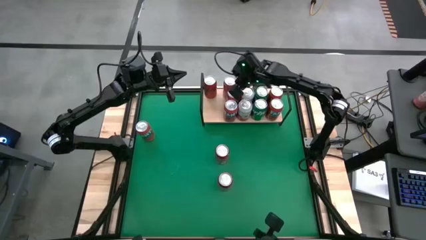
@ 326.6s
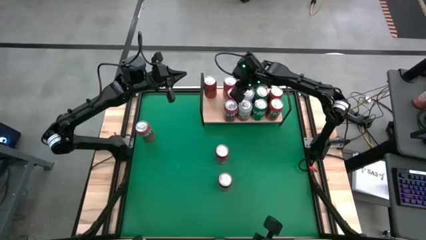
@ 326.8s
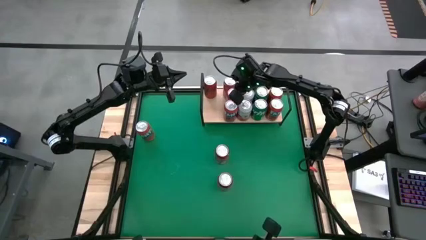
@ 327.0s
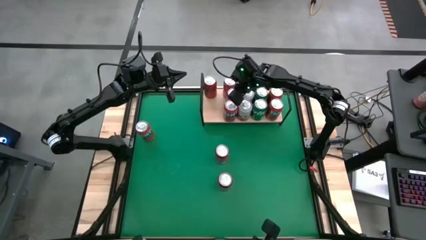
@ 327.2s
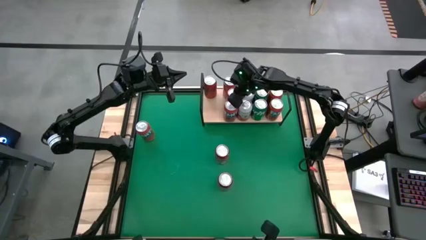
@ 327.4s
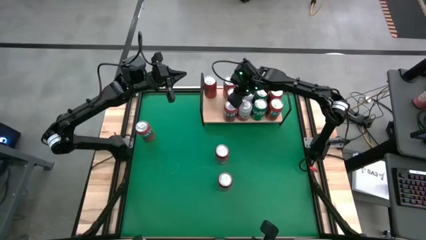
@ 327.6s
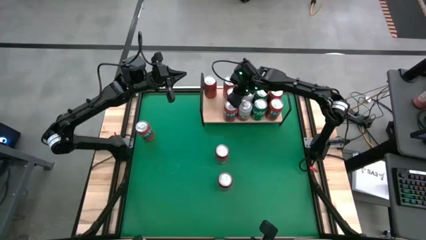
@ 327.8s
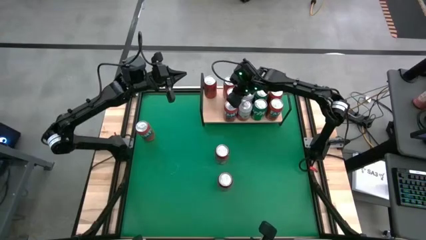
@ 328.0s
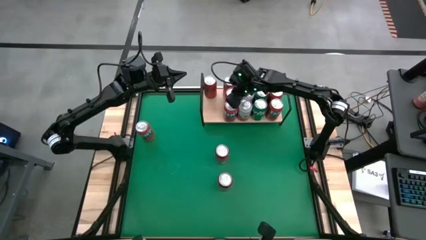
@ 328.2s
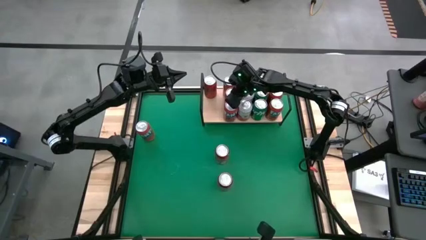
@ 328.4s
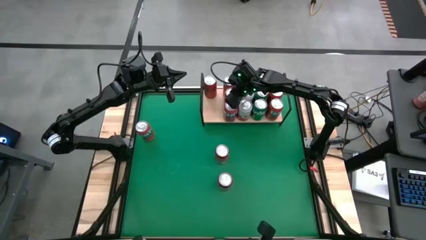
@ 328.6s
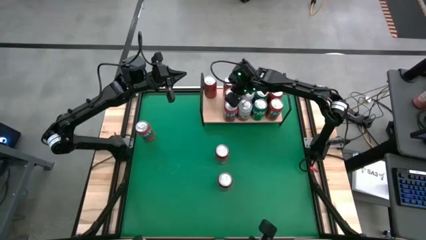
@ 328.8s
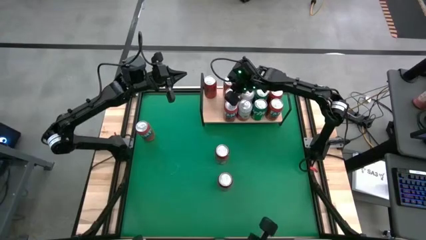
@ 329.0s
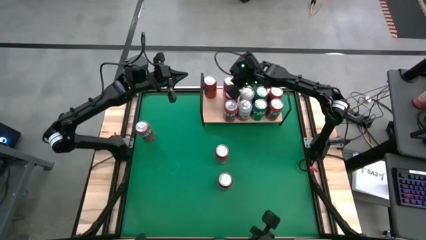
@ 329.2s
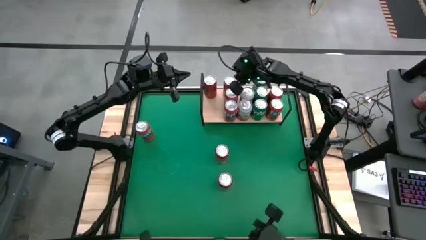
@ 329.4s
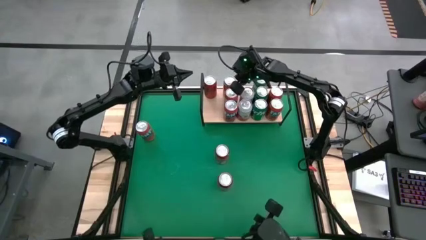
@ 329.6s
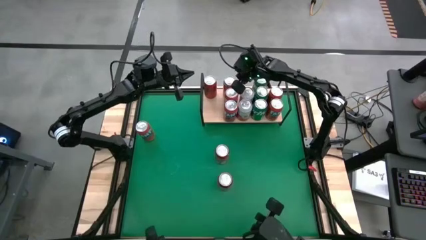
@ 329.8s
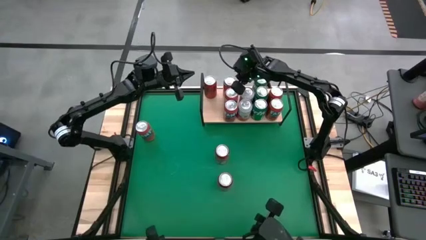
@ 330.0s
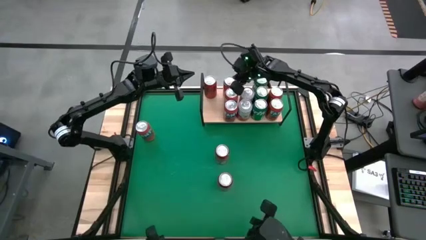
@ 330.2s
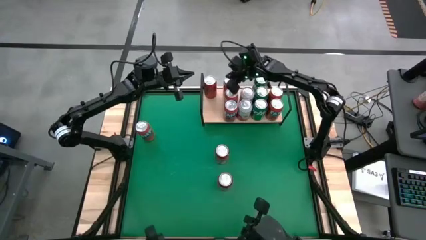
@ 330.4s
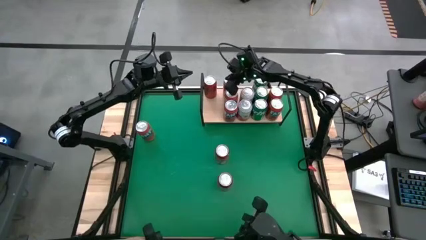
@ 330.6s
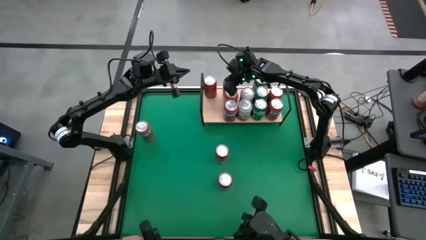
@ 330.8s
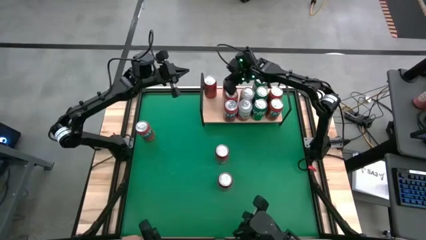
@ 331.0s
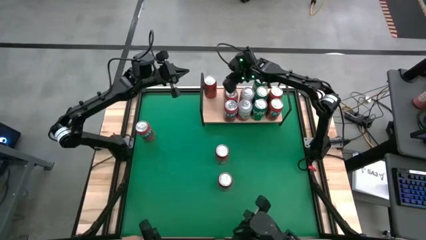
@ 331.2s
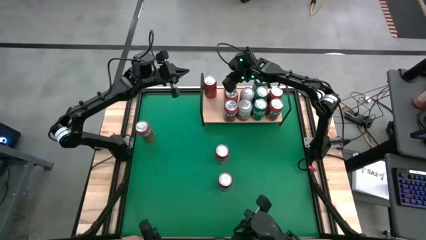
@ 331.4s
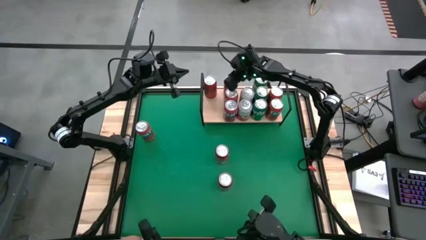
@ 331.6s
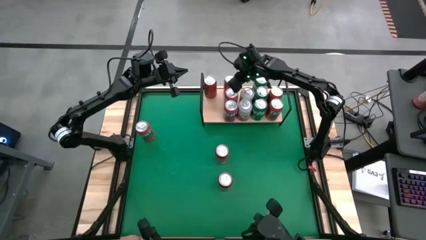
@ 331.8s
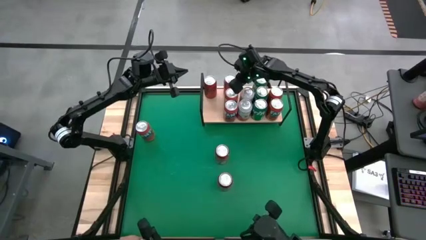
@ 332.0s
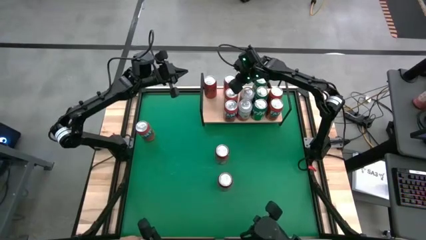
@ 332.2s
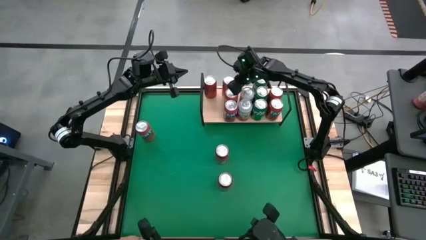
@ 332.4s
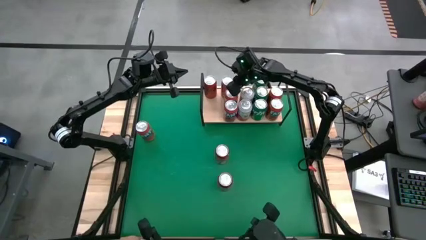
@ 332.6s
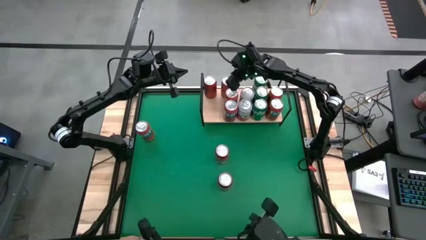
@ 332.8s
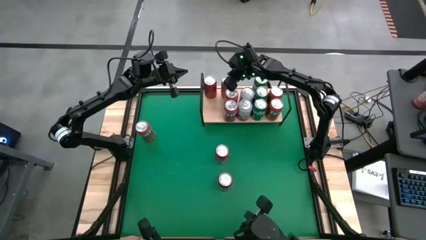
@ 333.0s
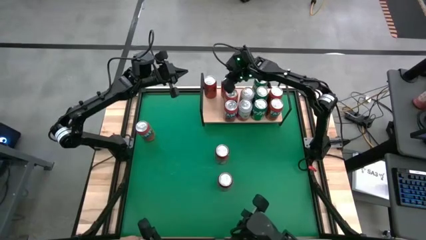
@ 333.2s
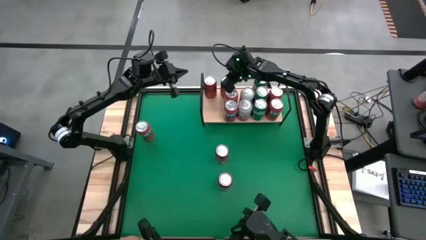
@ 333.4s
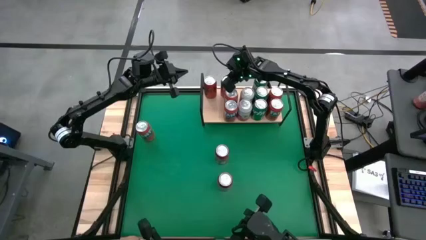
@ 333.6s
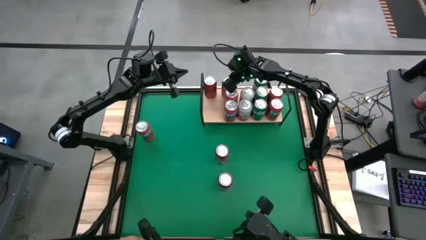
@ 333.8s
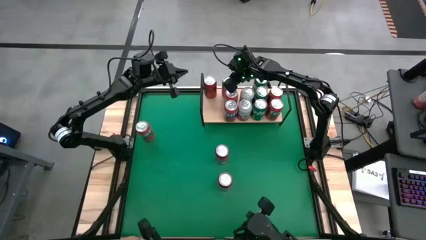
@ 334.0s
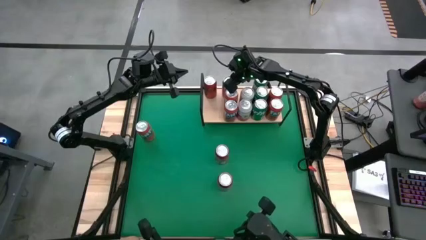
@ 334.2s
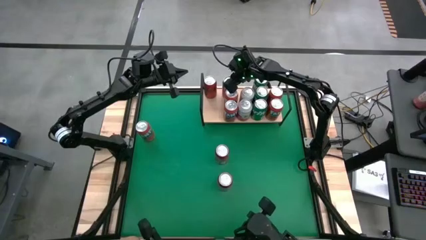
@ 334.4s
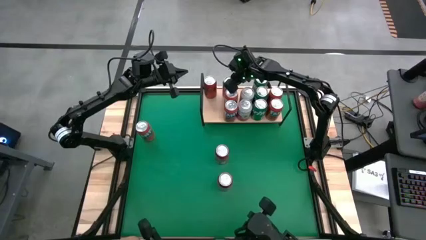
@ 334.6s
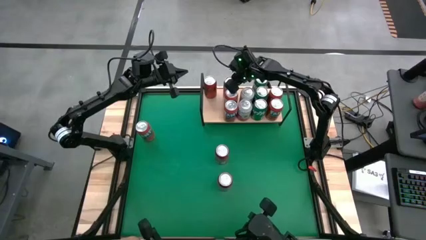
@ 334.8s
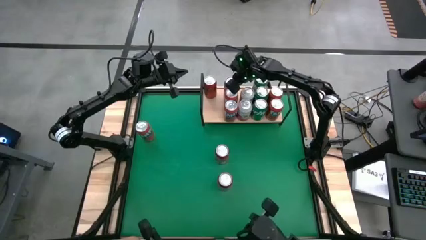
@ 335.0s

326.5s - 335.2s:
Task: Place canned beverage on shelf
Adjust the red soda cans on the shelf

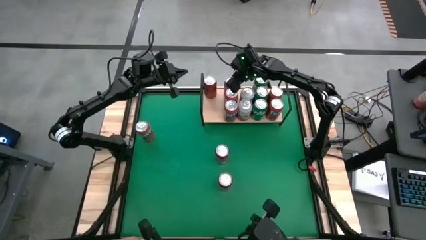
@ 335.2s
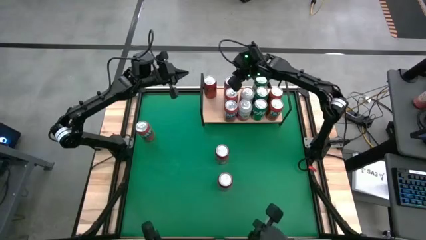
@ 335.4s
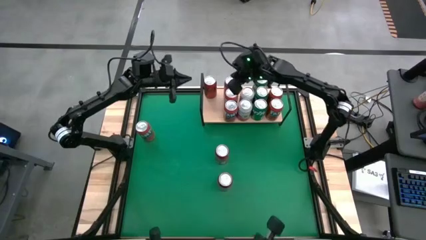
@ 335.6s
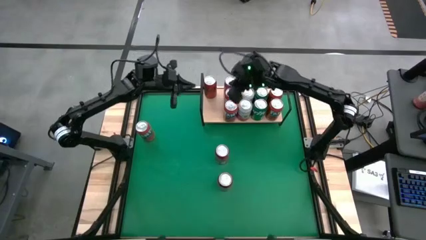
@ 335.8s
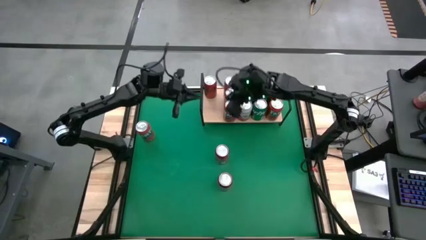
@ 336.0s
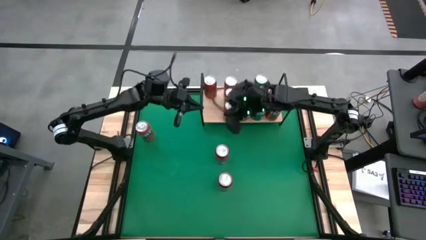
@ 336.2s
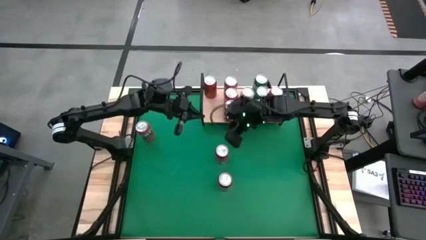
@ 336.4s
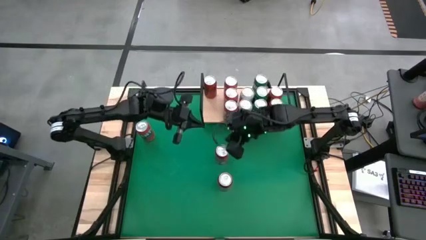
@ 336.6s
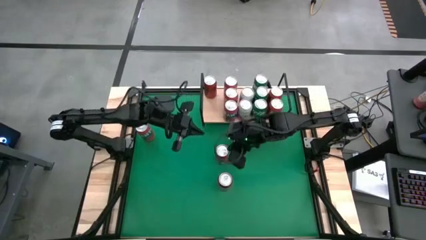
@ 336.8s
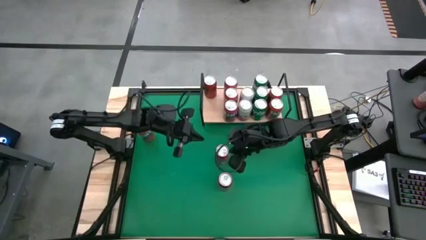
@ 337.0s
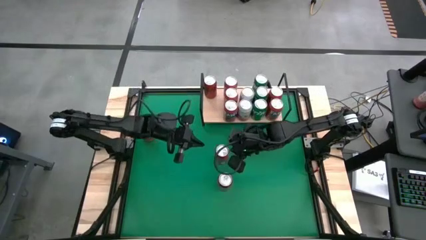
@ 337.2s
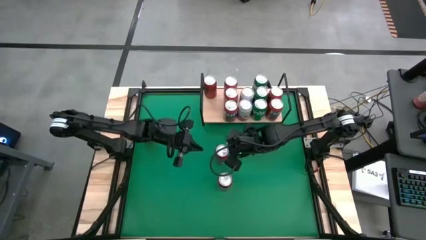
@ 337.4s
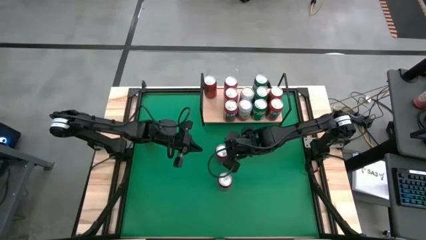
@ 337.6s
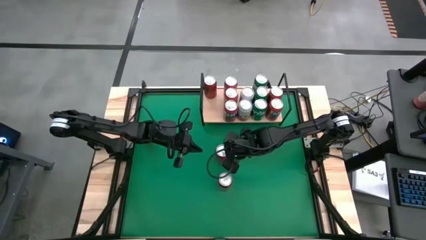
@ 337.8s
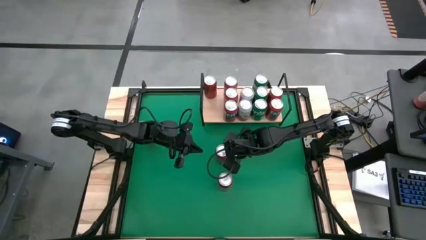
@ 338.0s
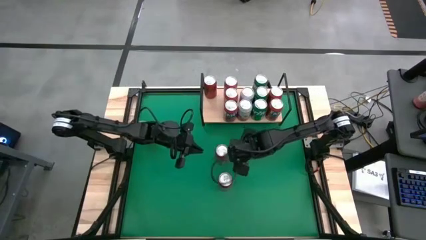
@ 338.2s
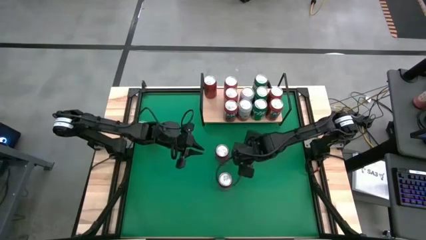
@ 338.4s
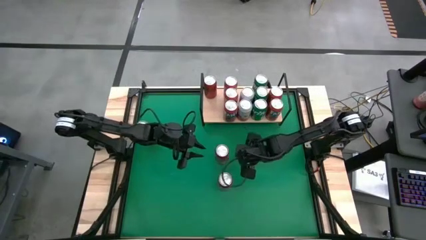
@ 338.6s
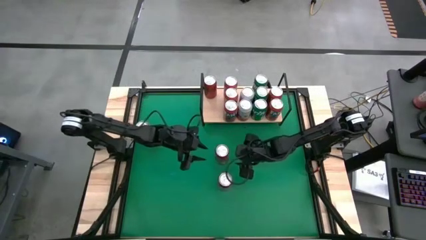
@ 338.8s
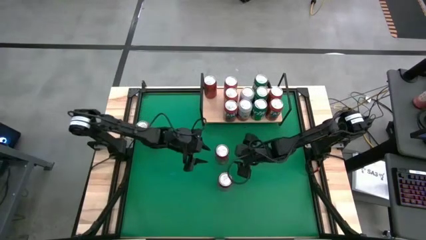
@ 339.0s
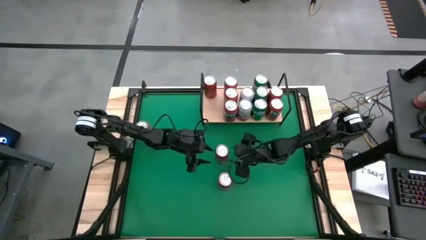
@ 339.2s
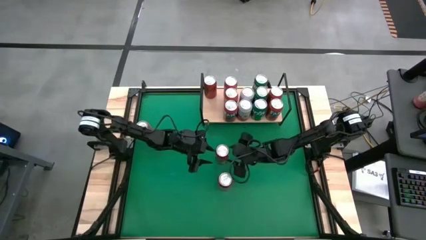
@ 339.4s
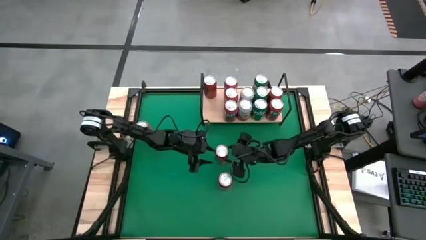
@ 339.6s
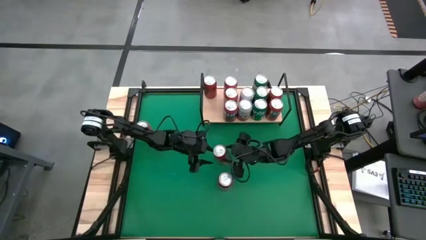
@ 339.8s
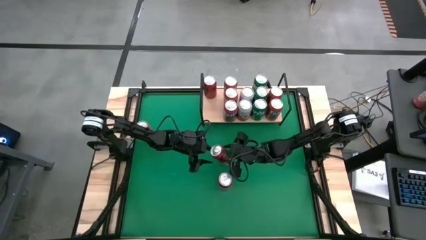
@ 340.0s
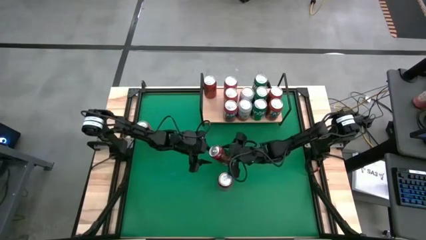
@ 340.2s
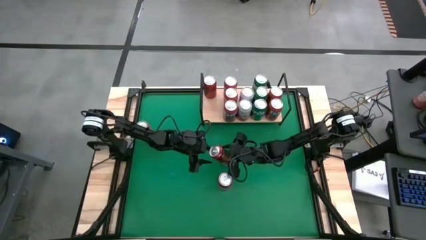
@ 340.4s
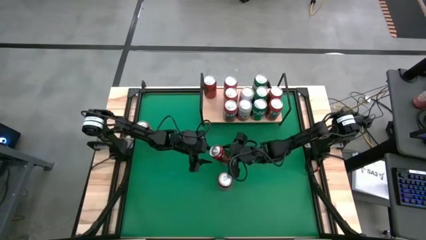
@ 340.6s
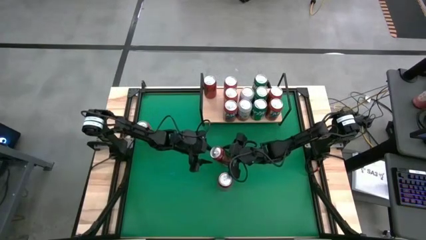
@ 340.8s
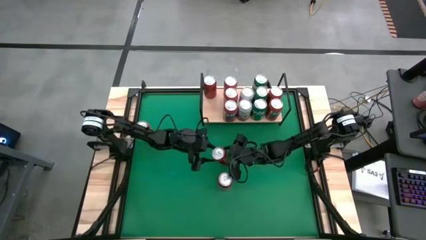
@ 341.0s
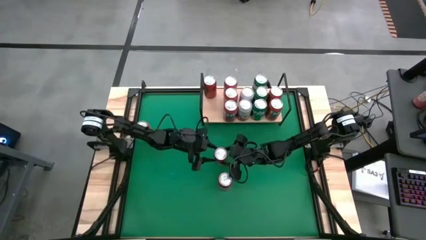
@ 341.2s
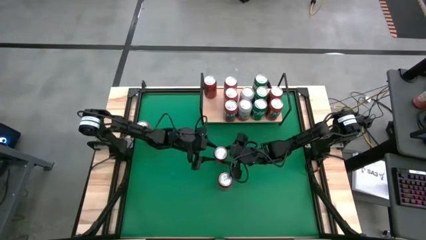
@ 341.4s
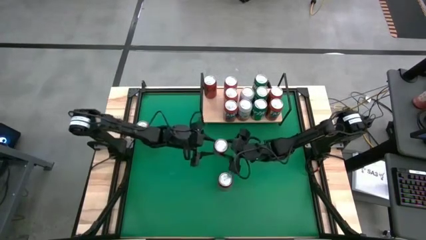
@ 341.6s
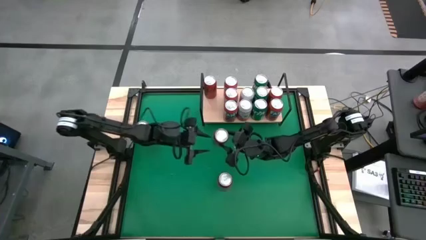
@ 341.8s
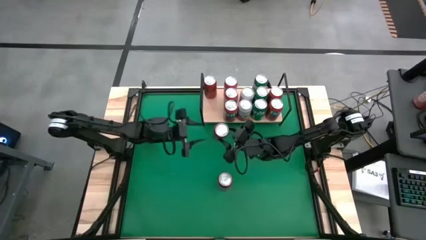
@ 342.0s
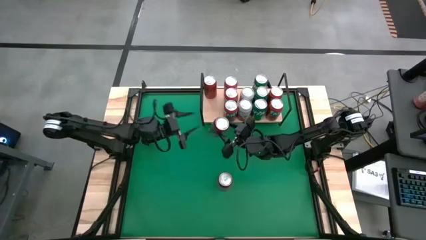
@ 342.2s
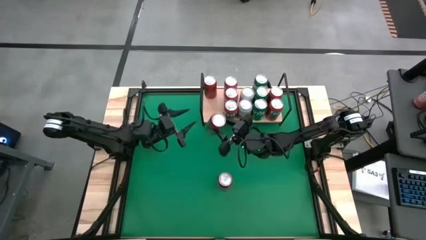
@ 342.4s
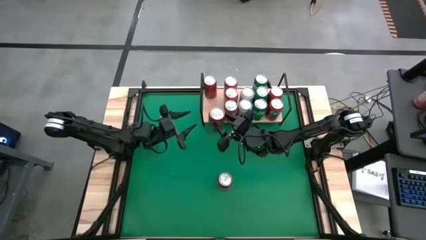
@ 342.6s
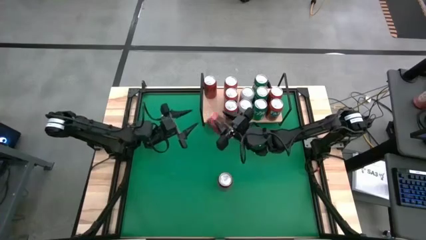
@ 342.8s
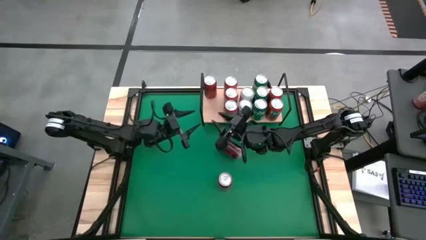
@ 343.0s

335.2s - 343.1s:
Put the red-black soda can on the shelf aligned with the other red-black soda can
